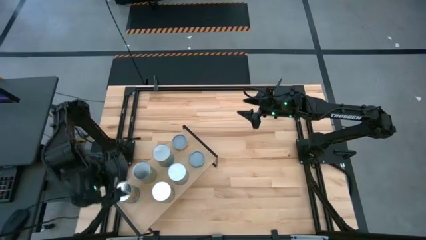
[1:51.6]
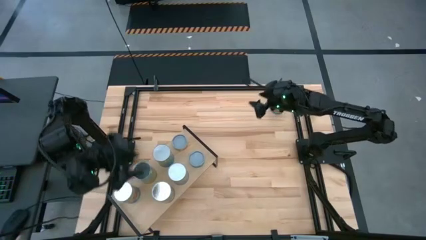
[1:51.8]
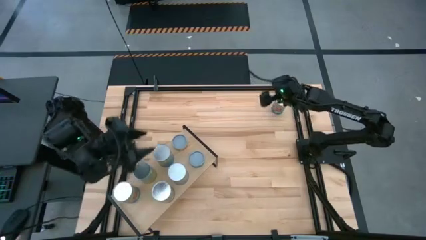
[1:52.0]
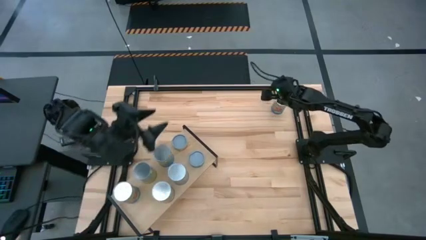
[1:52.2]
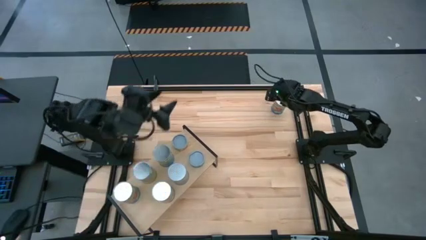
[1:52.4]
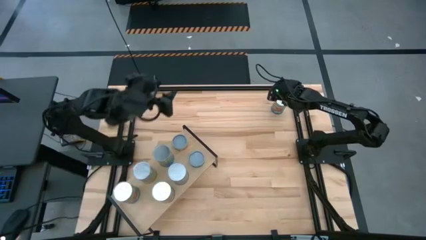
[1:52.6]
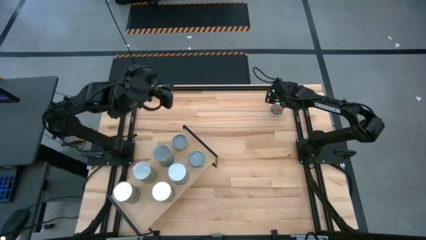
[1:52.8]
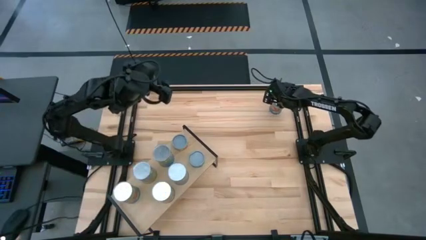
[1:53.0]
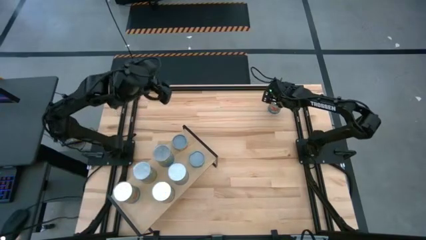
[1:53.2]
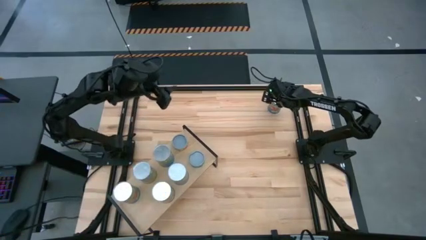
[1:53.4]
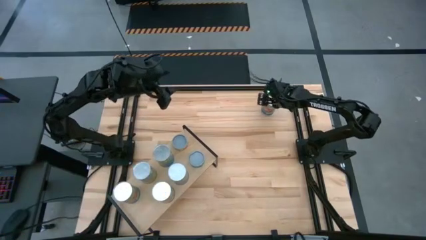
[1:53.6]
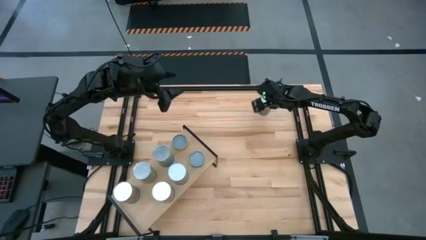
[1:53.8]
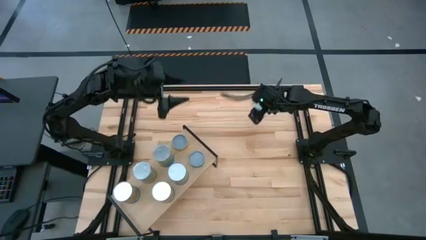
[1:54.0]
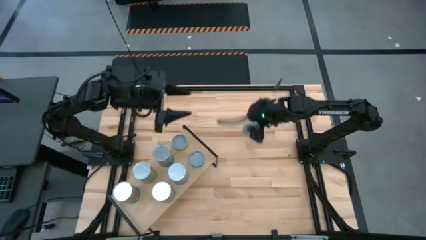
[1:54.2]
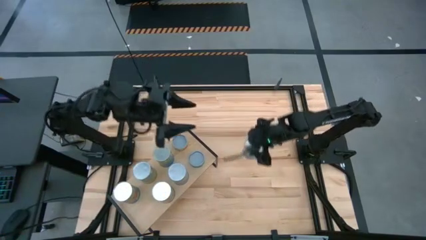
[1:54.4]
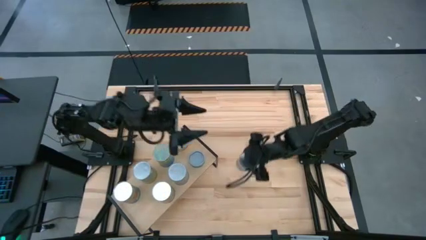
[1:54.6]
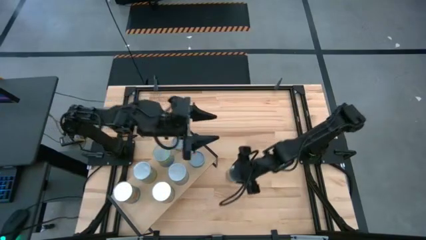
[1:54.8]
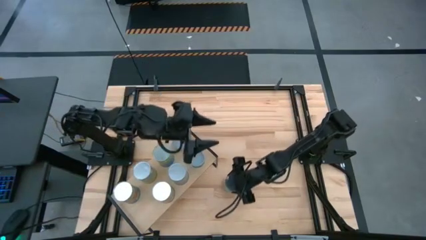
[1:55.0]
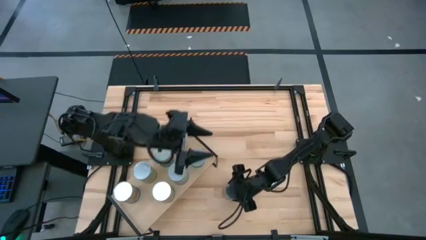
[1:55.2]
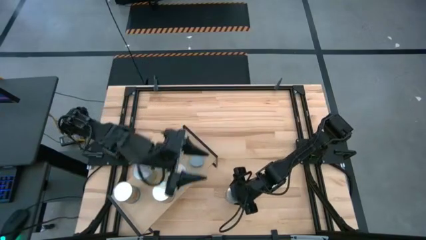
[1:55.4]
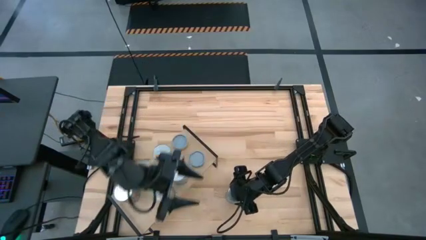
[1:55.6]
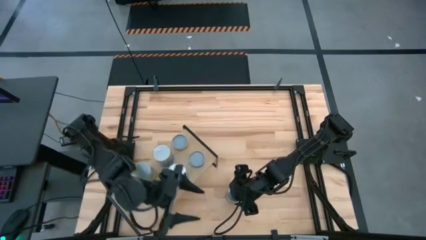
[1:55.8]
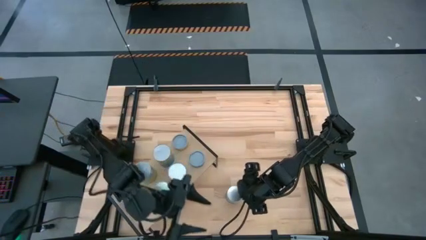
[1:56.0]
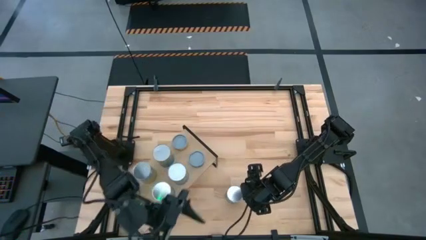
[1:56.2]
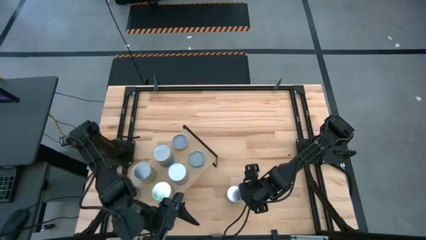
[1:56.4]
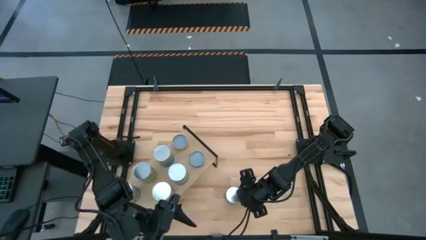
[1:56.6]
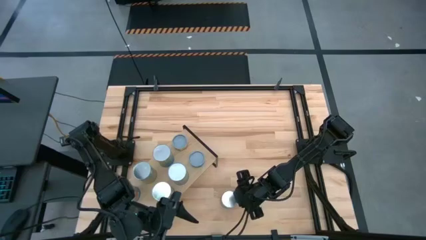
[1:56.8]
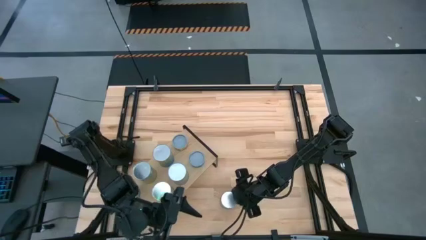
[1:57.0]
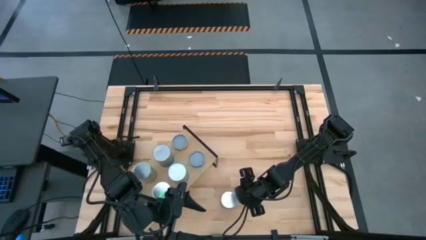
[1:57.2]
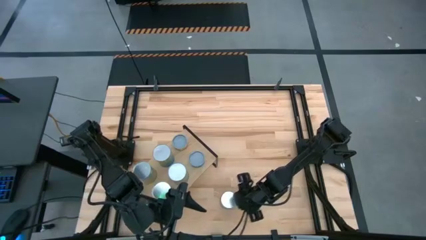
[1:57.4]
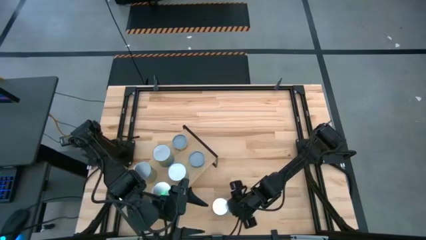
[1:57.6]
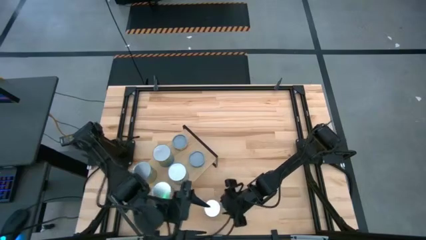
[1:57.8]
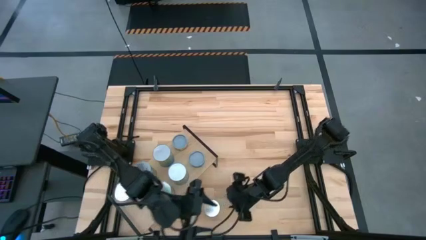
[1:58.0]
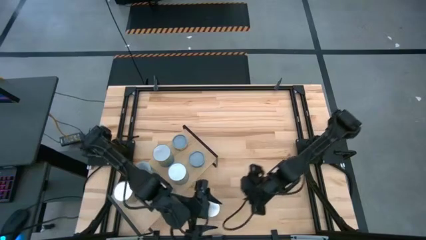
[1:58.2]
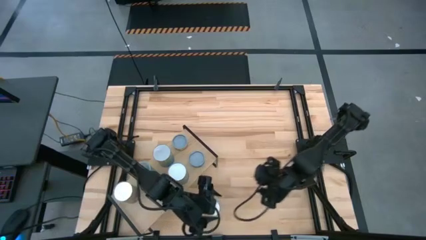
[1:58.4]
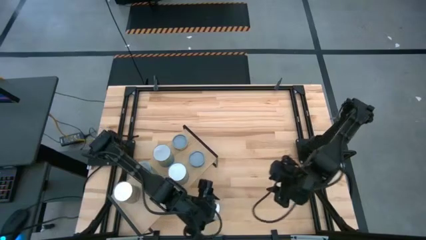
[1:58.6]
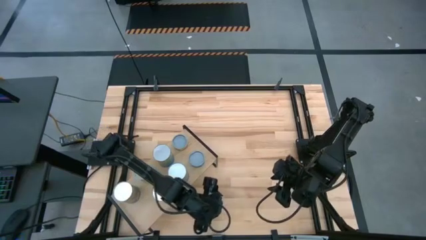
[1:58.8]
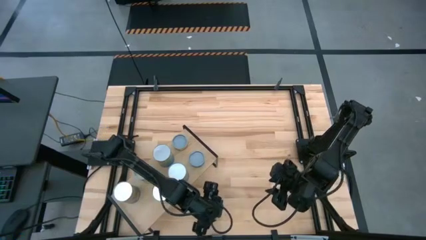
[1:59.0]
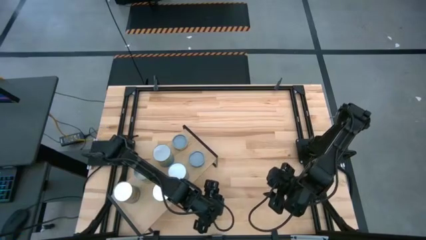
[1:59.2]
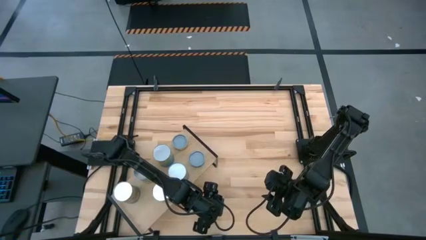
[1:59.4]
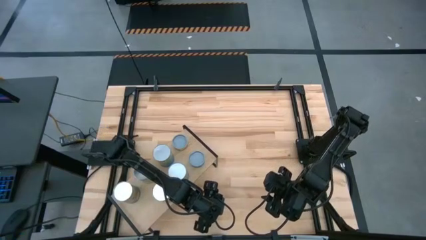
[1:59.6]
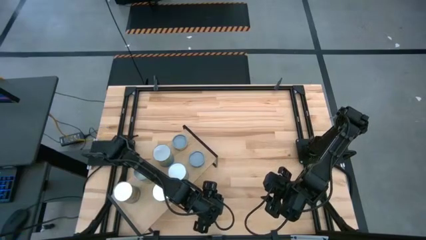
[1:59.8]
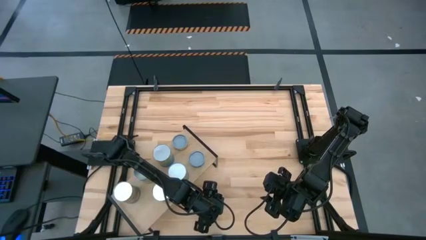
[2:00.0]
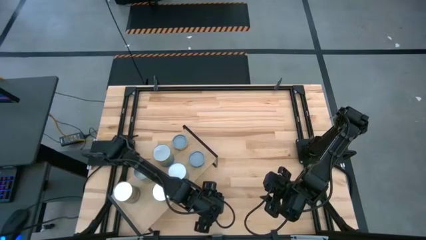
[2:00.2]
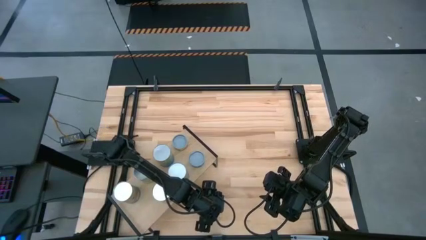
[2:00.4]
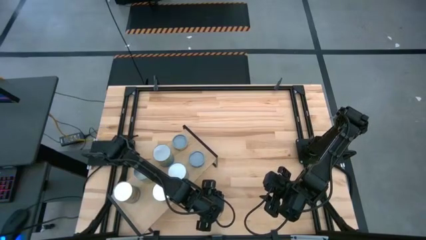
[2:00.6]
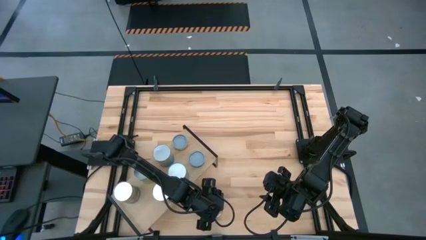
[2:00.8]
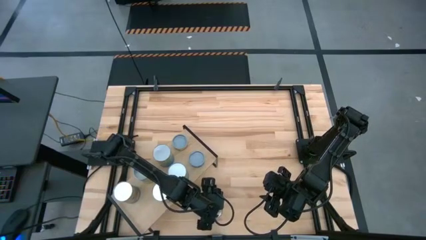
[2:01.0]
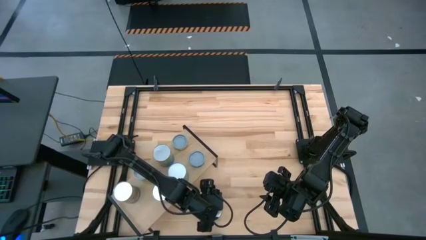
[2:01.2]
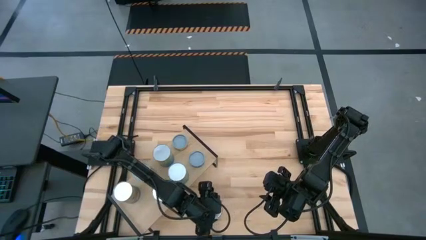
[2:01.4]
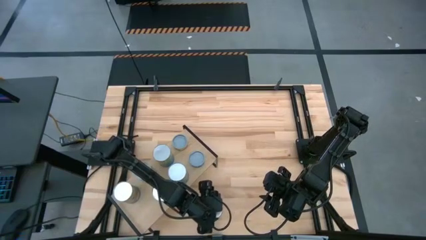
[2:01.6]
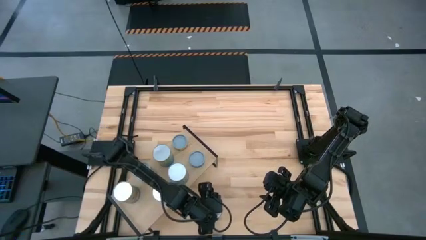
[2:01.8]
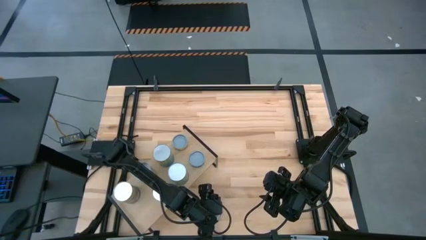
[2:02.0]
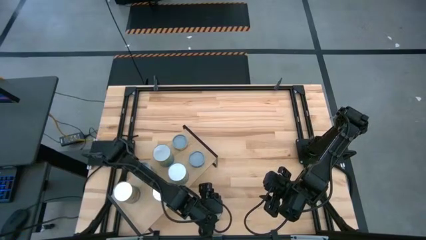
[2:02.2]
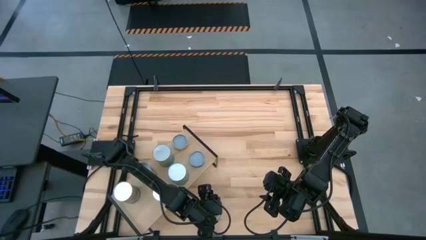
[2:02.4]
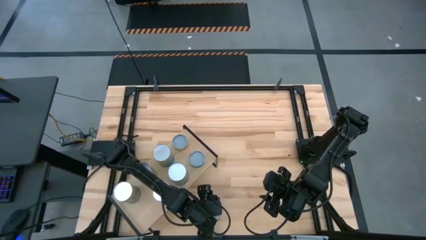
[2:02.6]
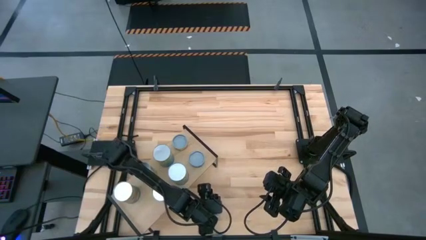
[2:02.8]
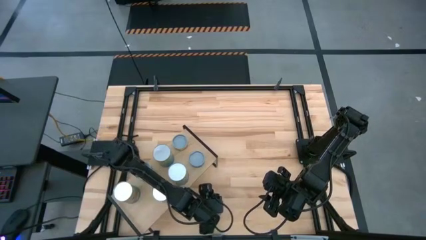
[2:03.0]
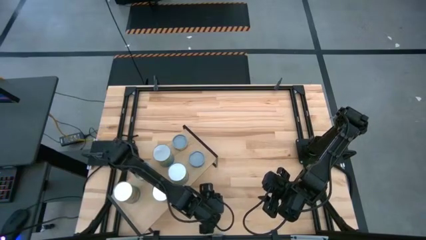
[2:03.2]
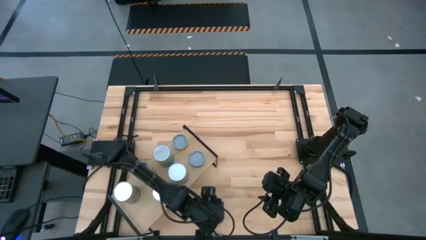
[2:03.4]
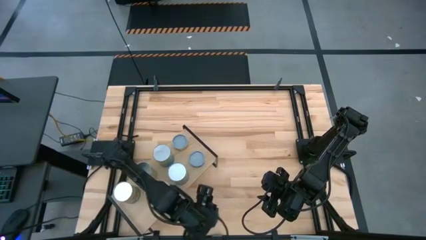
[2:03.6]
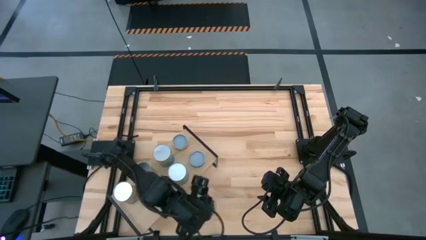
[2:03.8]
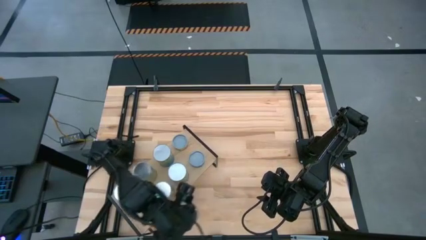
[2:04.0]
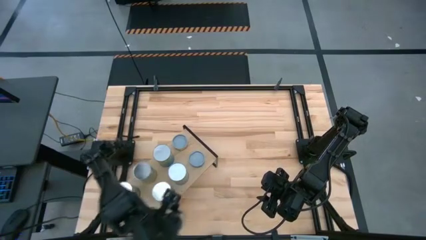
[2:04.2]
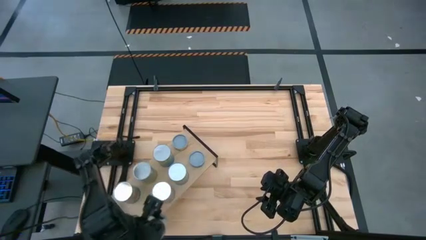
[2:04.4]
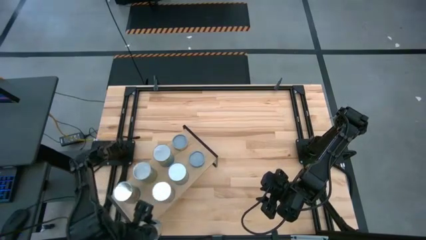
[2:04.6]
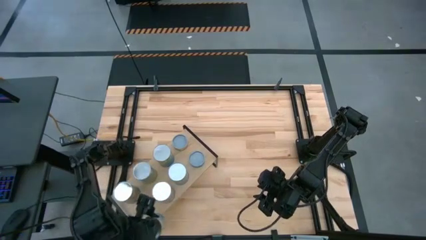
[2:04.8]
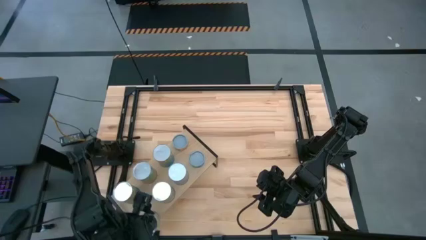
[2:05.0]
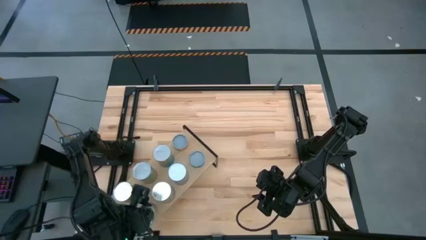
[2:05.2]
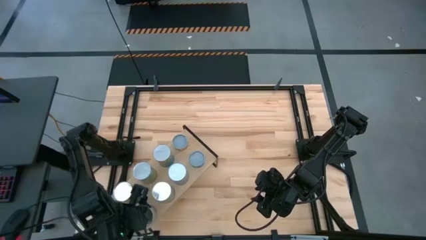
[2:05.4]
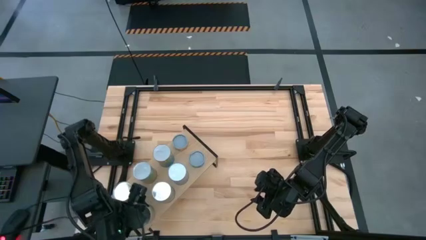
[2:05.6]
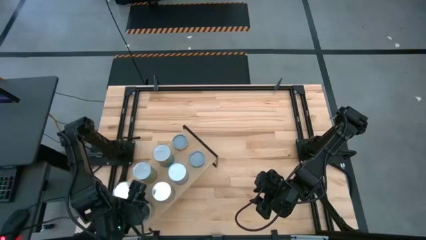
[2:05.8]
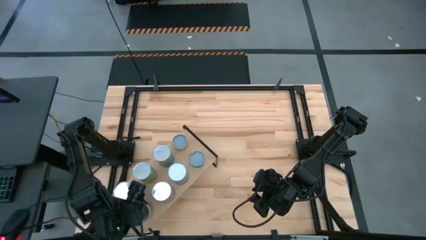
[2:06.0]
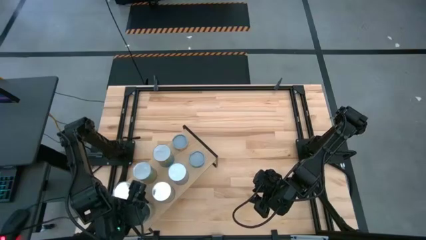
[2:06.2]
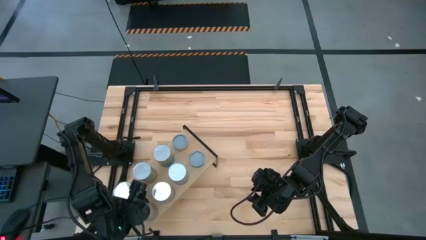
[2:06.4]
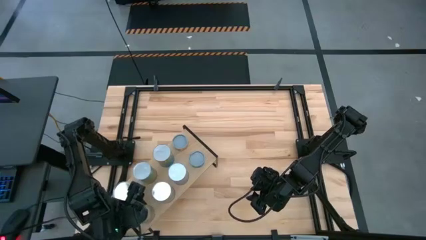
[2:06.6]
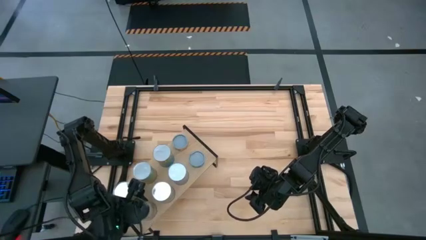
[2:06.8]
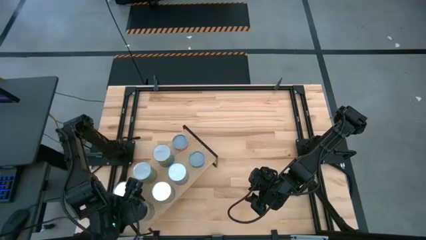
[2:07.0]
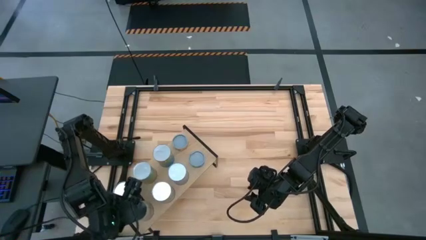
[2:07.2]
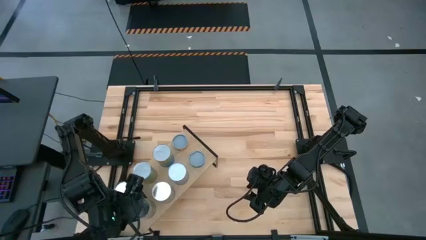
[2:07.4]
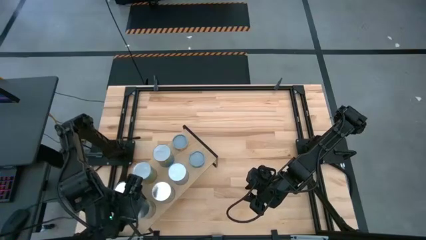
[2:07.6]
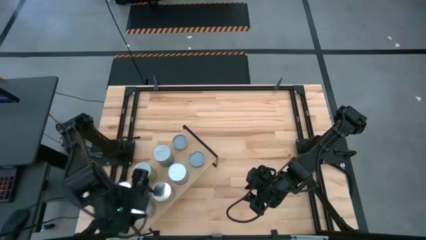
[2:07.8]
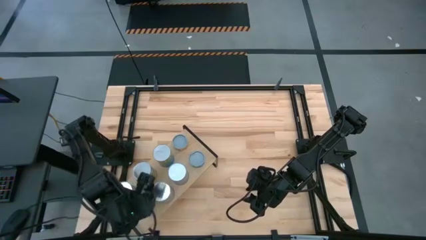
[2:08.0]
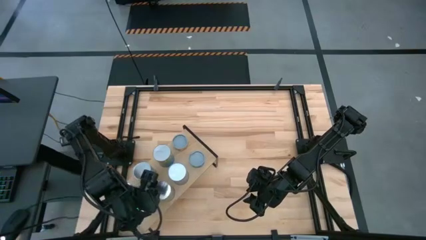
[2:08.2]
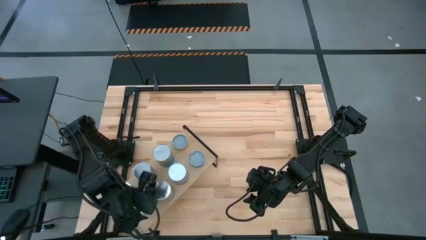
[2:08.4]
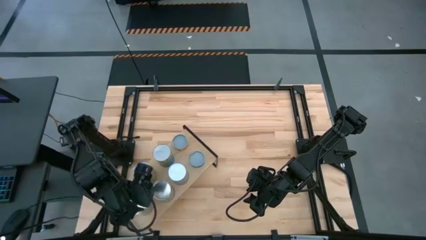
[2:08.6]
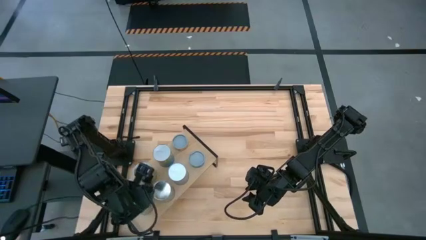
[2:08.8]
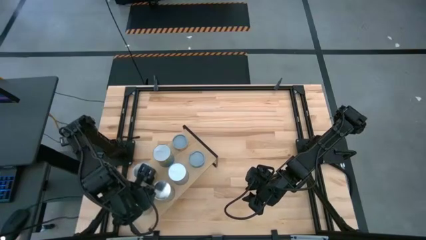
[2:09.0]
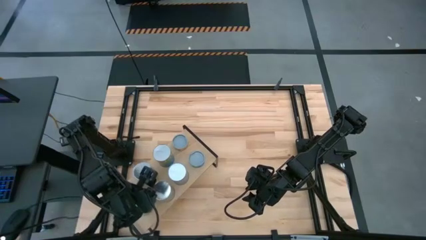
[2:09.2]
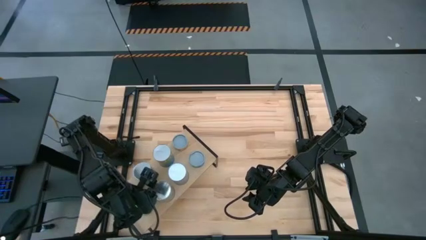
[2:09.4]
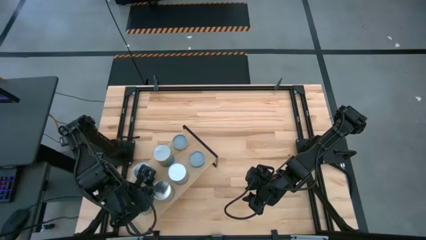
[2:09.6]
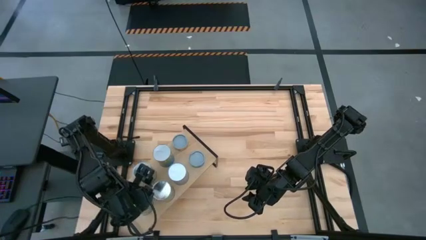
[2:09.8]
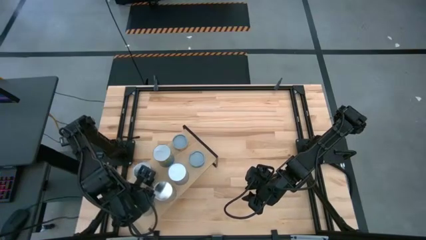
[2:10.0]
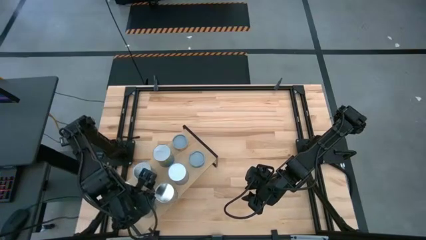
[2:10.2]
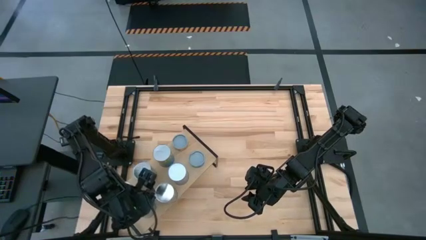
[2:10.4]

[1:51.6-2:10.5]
Task: Pick and place cans onto a shelf
Put the canned tomatoes on the shelf
